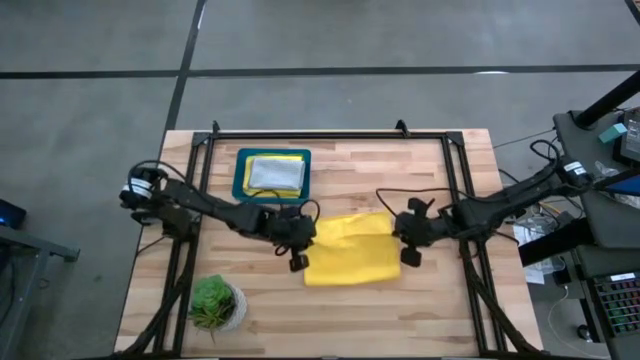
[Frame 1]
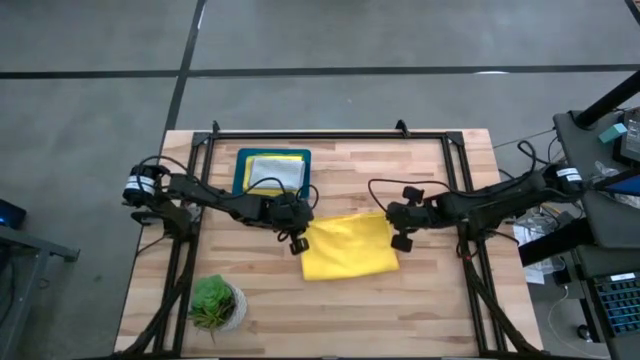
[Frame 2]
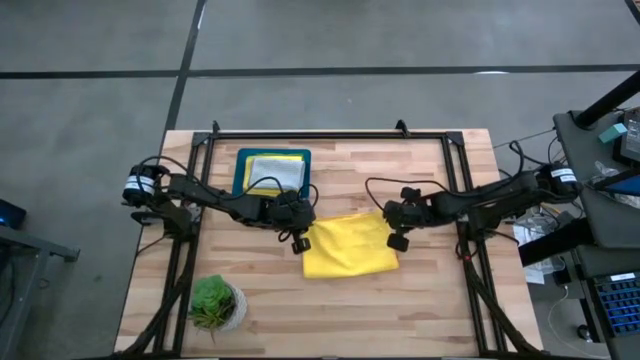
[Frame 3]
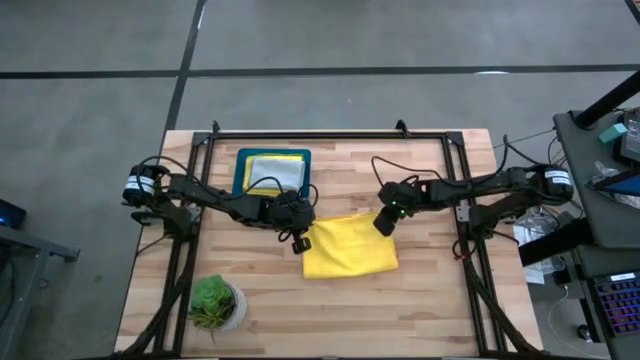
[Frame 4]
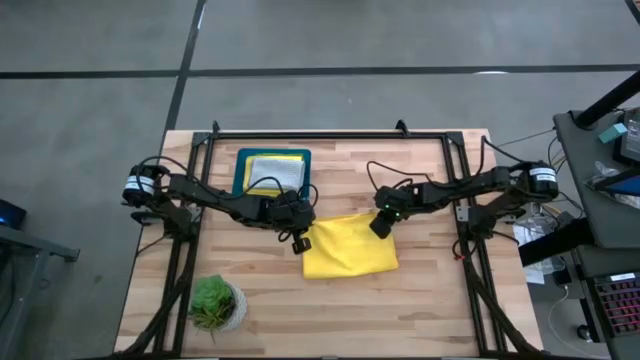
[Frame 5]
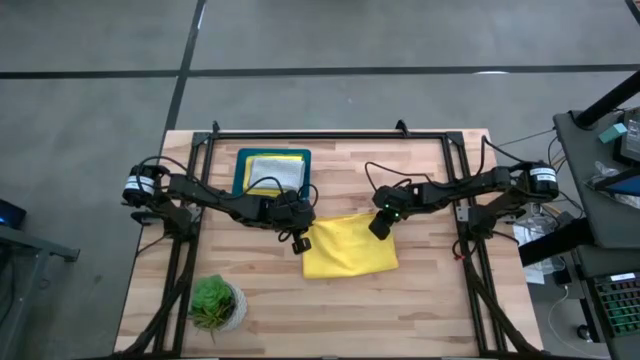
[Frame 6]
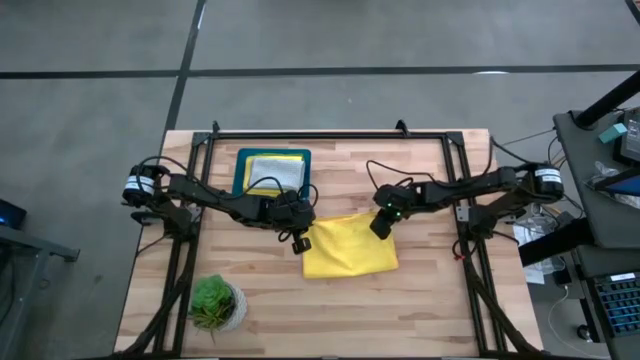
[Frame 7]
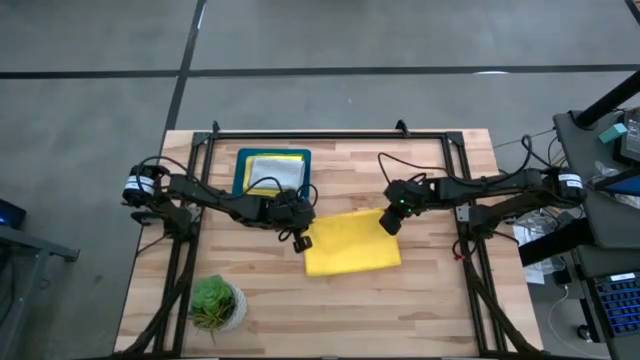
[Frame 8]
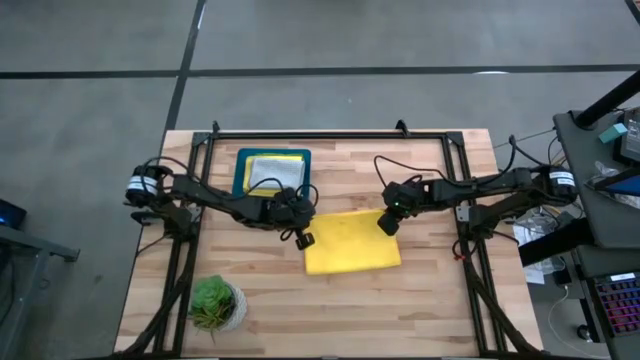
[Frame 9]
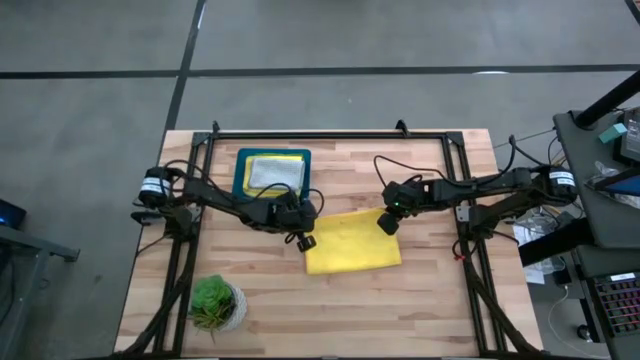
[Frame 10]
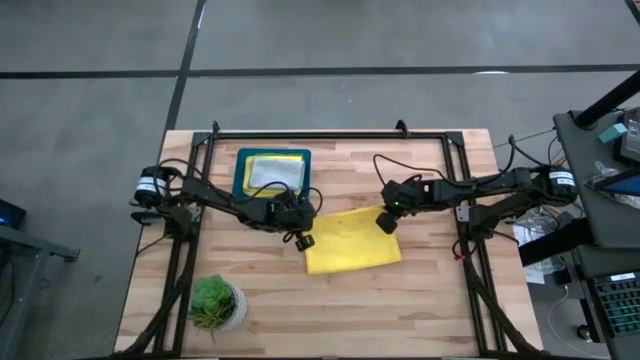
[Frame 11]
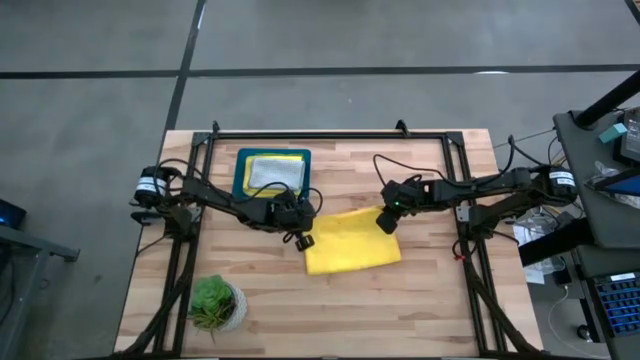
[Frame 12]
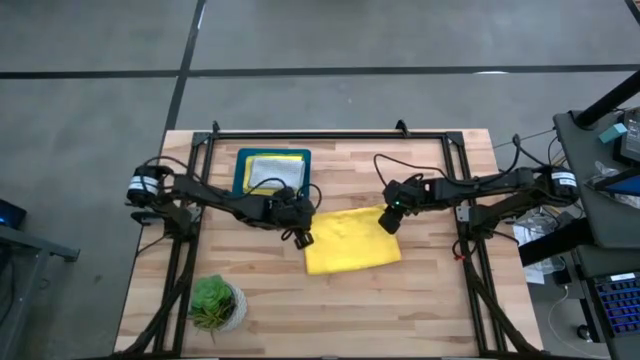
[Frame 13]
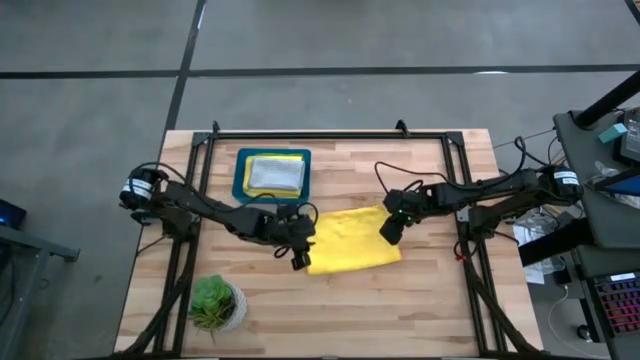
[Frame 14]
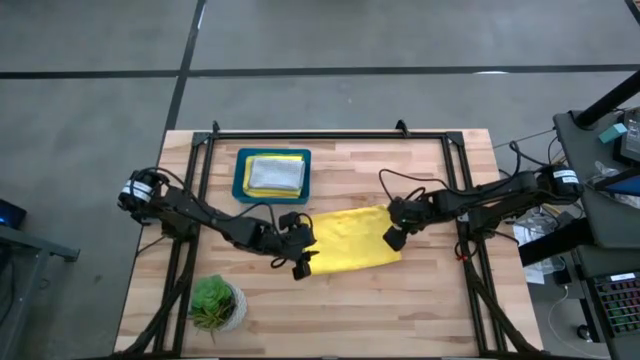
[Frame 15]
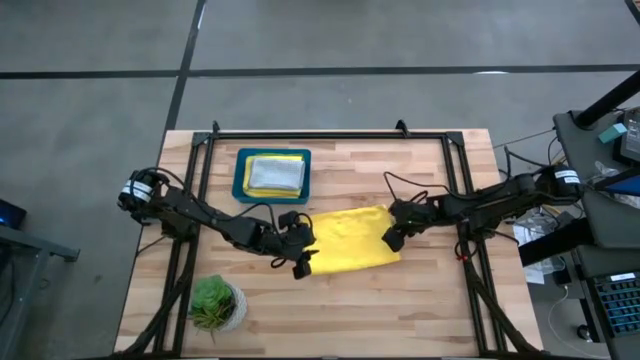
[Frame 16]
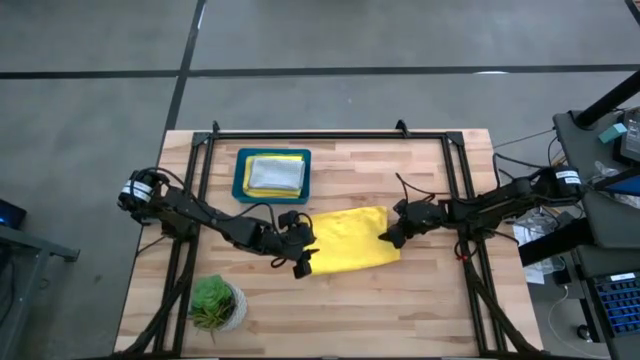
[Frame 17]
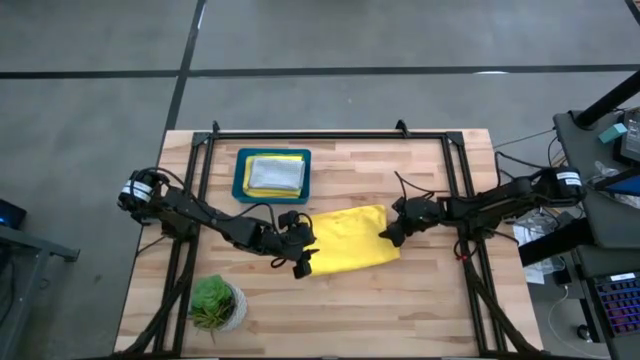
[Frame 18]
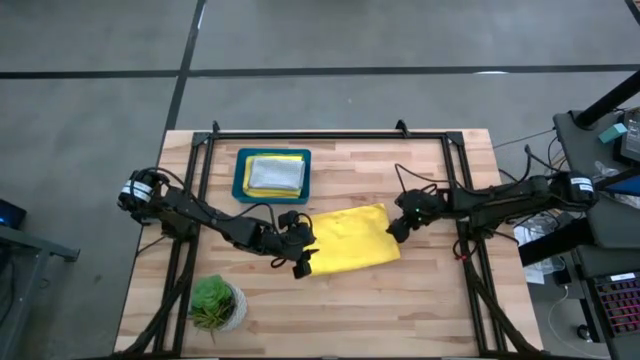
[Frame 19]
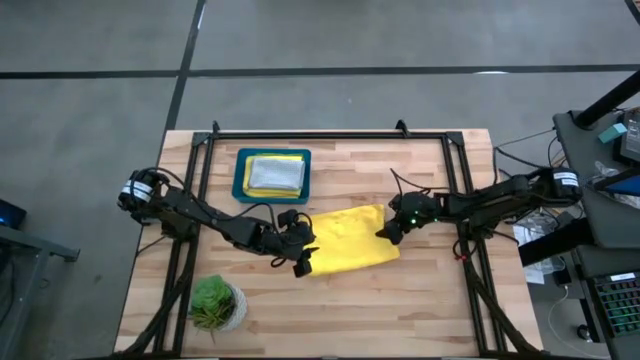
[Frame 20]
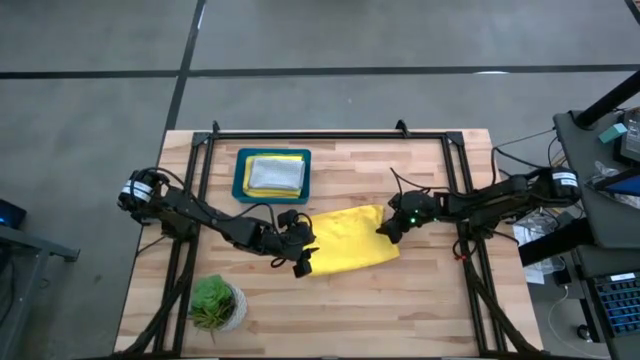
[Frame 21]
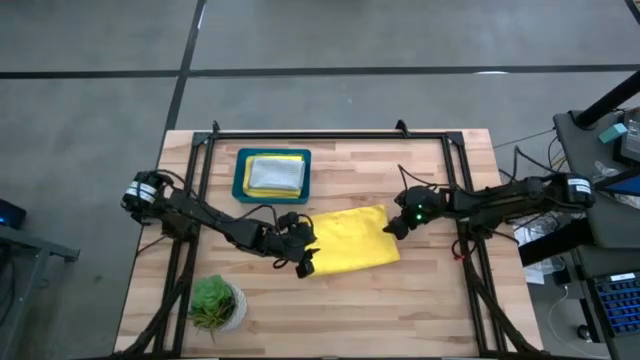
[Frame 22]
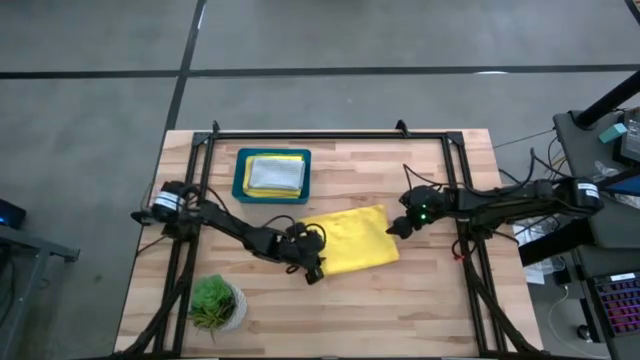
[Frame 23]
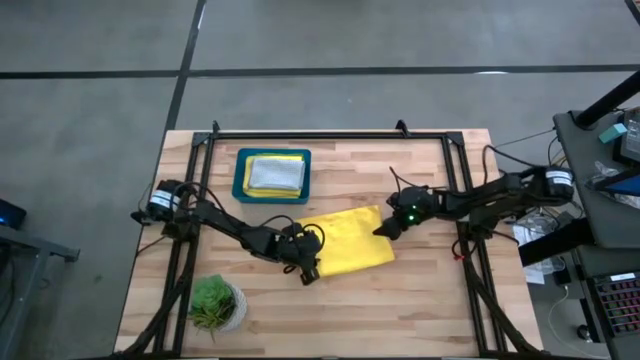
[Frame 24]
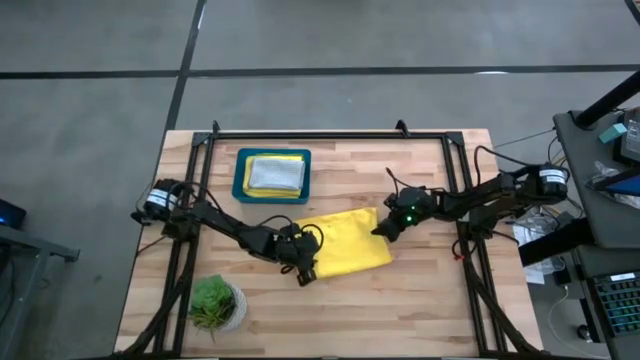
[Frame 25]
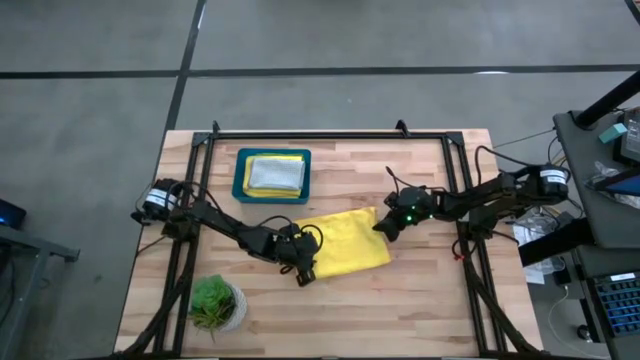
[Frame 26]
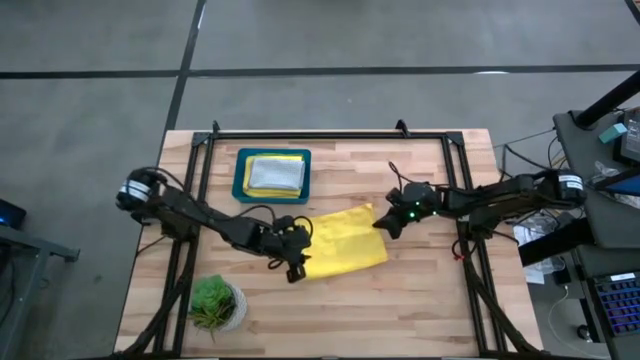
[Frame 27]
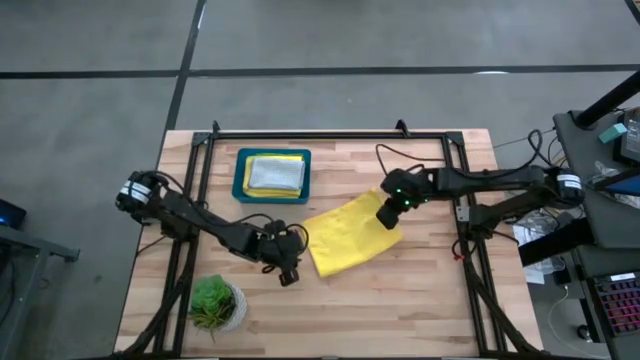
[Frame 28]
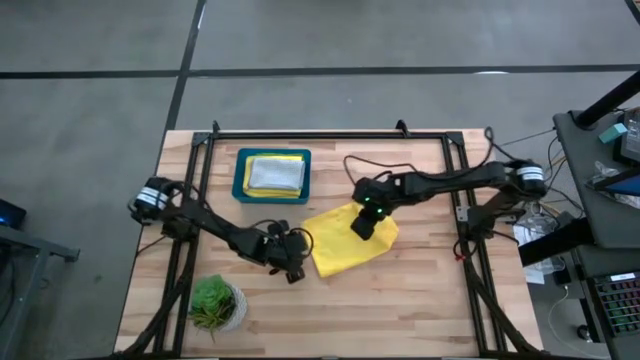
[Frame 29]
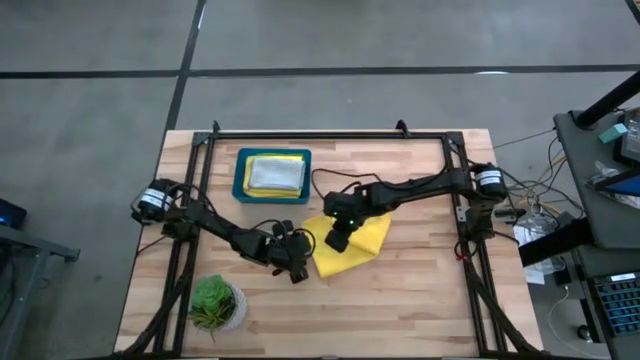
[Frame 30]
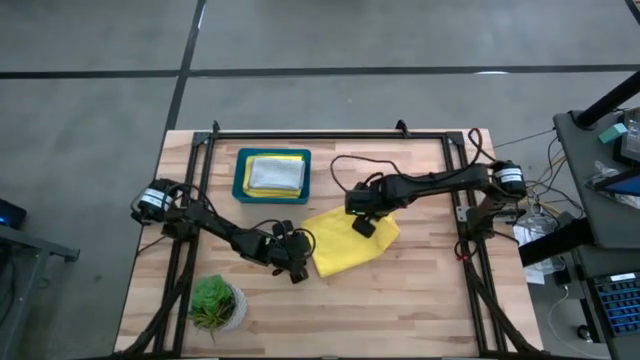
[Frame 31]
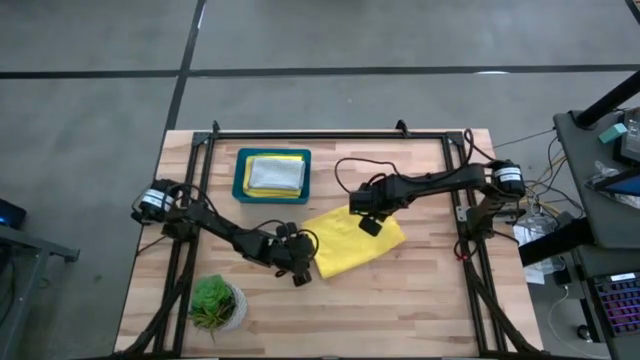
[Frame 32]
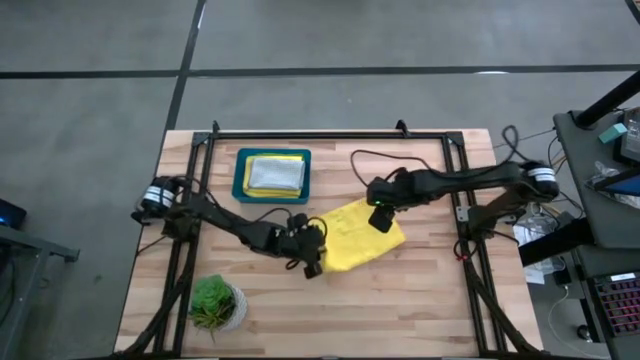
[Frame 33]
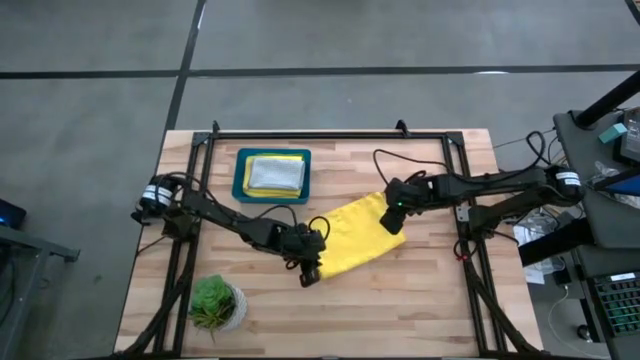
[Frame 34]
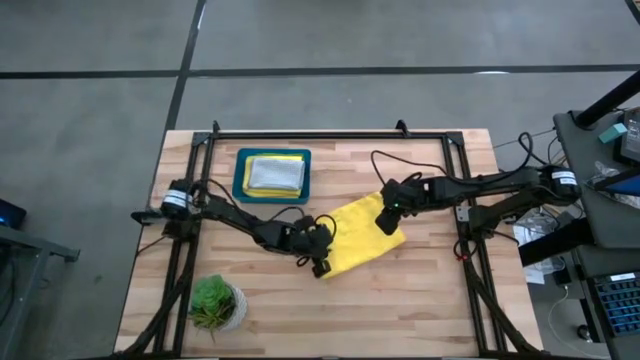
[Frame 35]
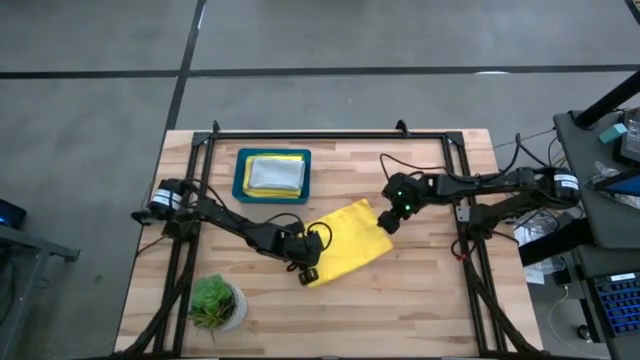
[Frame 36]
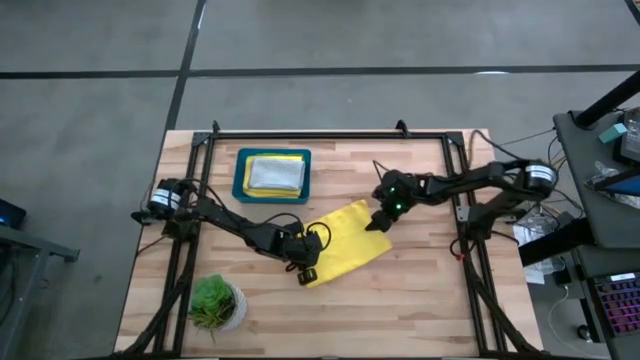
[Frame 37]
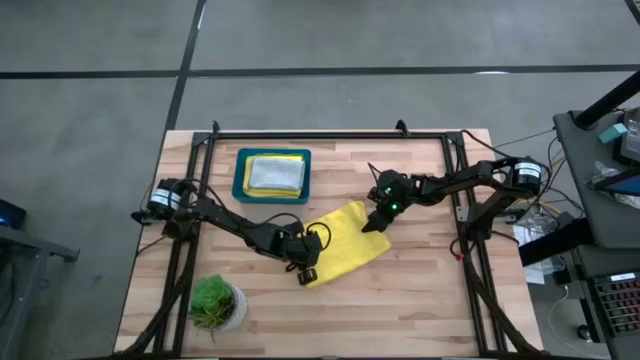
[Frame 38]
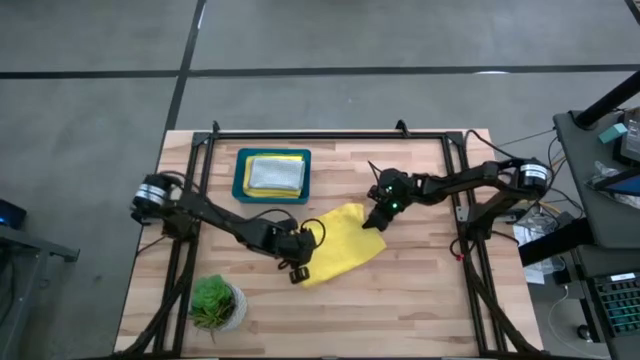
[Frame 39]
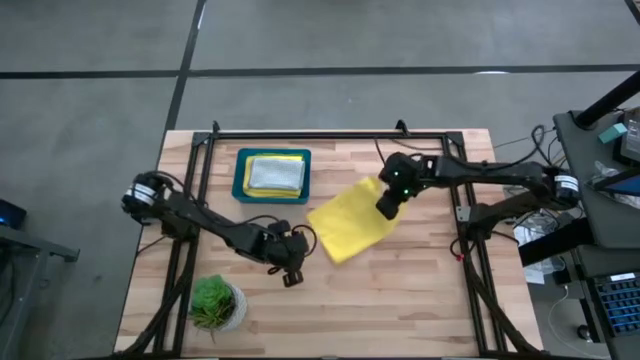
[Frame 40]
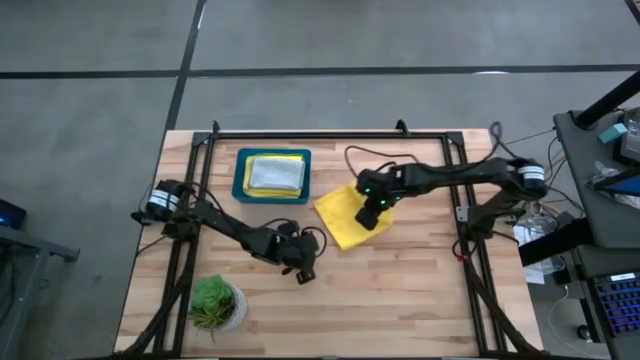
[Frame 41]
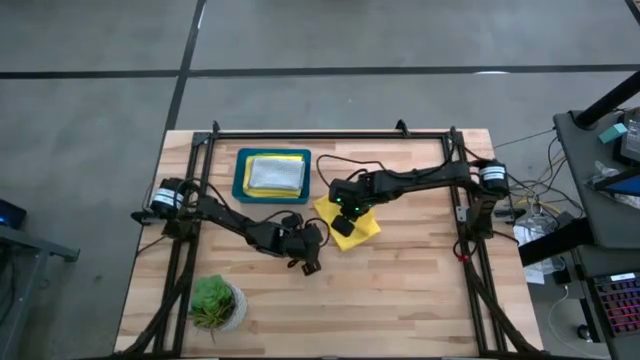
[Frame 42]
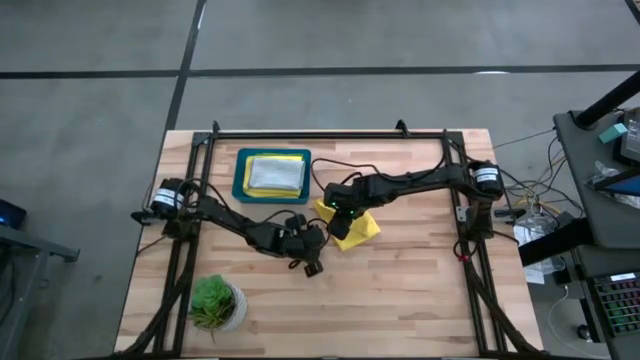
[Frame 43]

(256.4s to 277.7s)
Task: Fold microfiber towels
Fold the yellow microfiber towel
